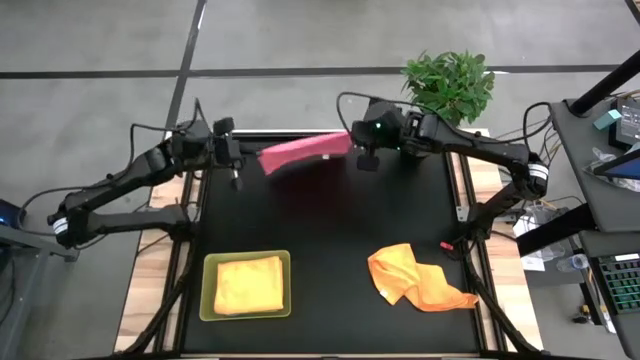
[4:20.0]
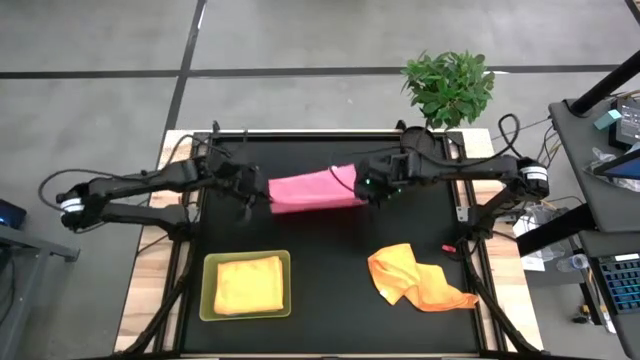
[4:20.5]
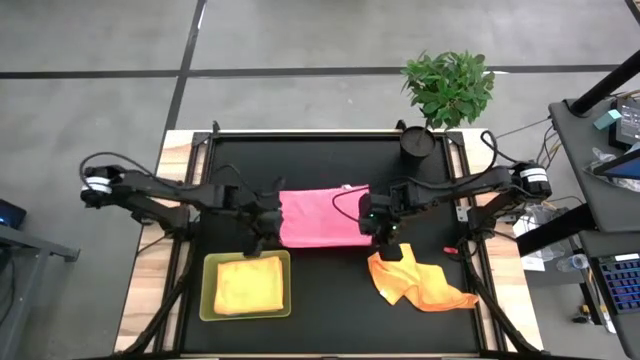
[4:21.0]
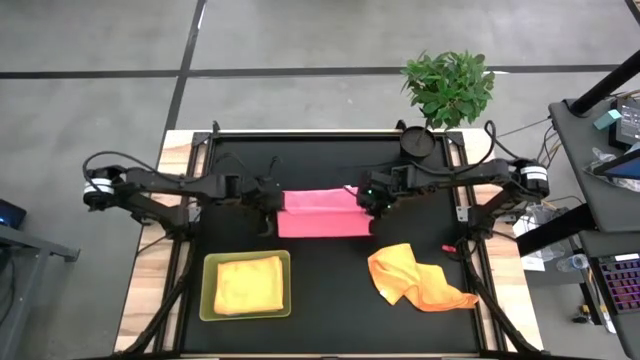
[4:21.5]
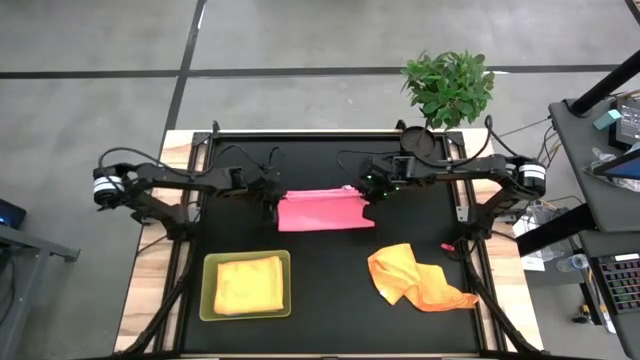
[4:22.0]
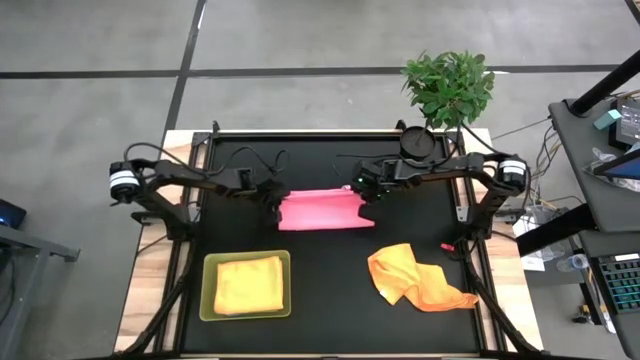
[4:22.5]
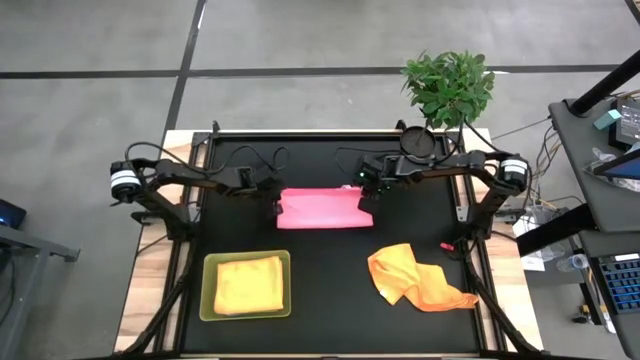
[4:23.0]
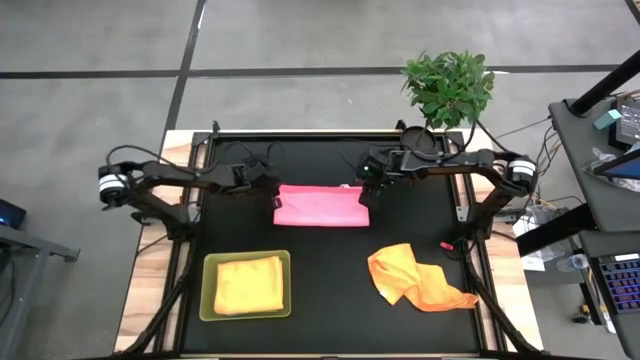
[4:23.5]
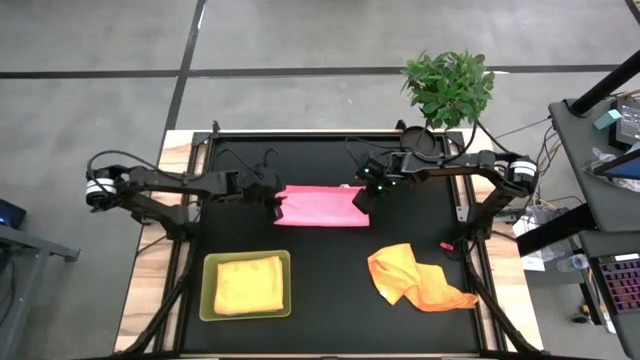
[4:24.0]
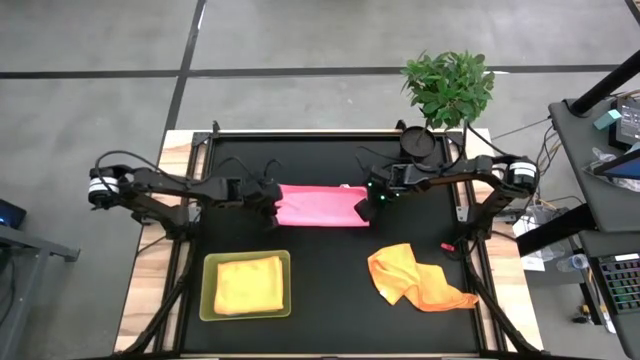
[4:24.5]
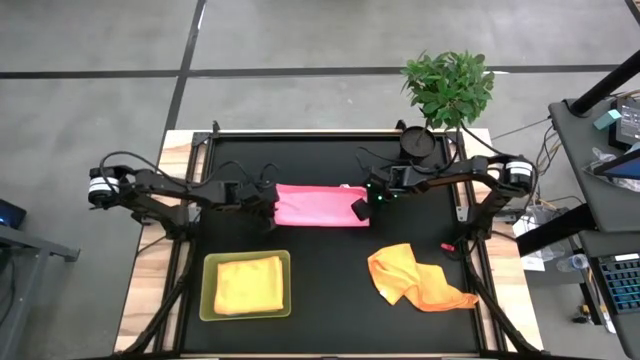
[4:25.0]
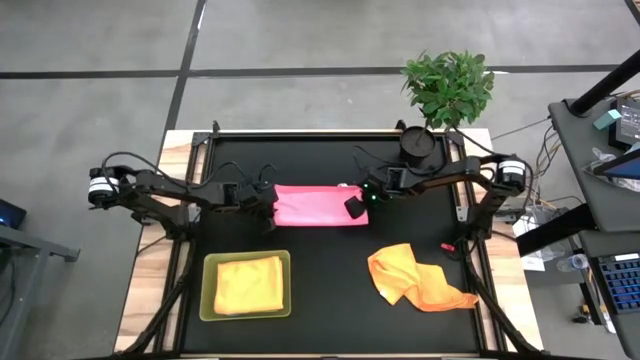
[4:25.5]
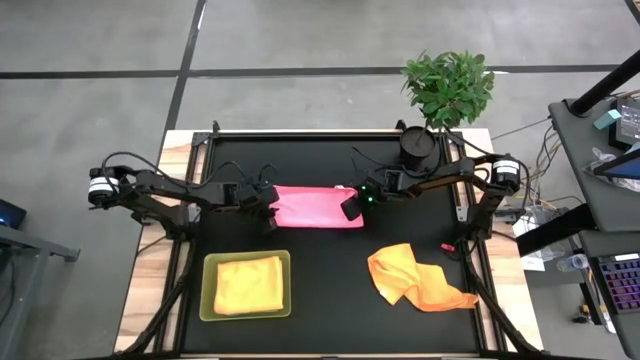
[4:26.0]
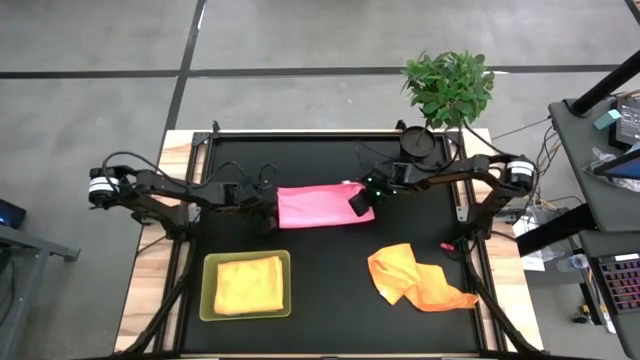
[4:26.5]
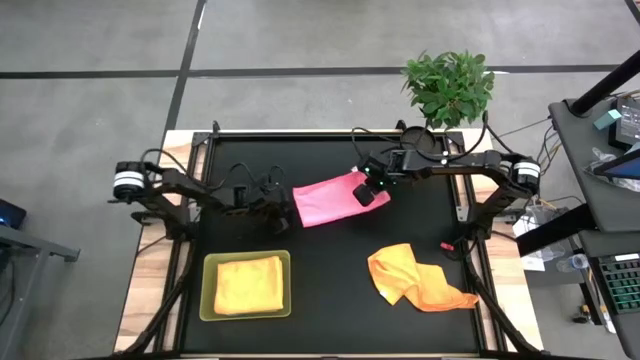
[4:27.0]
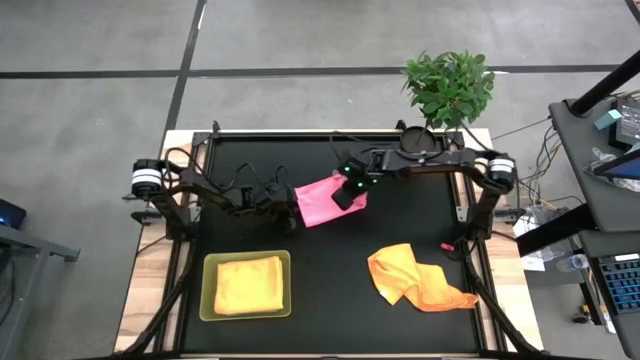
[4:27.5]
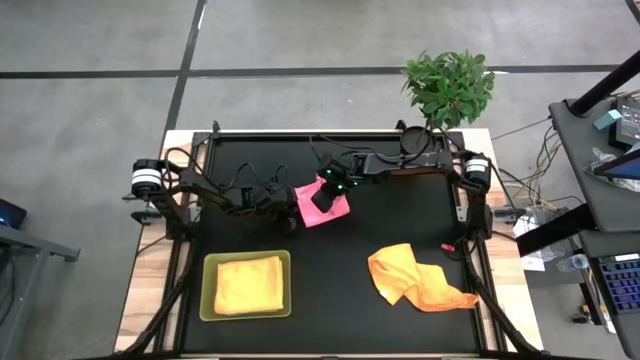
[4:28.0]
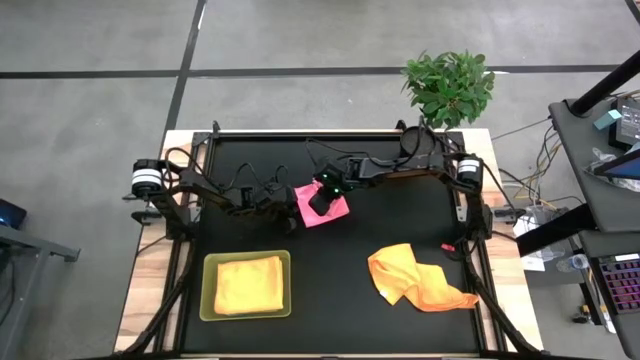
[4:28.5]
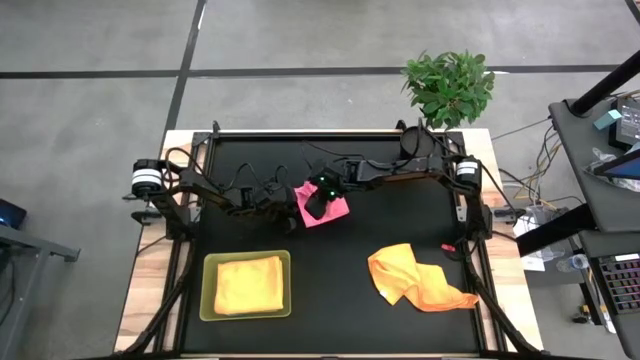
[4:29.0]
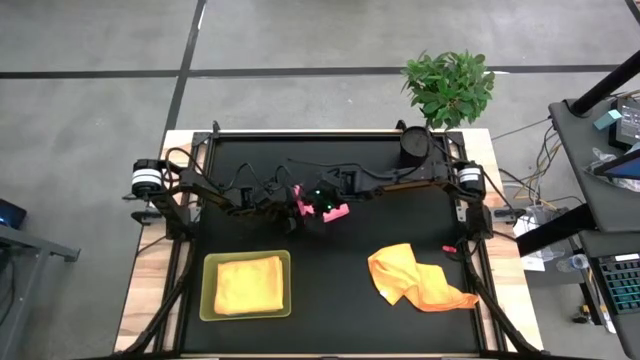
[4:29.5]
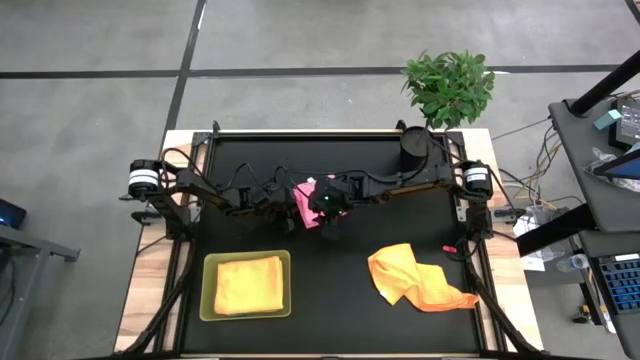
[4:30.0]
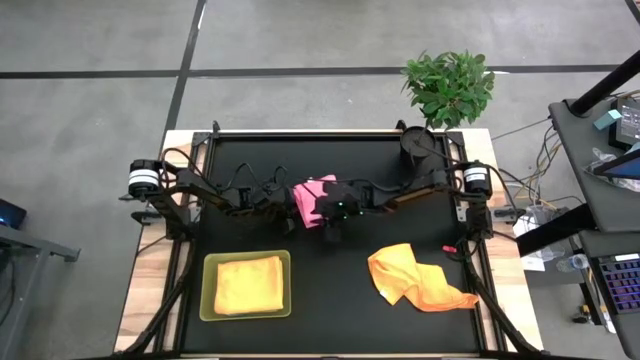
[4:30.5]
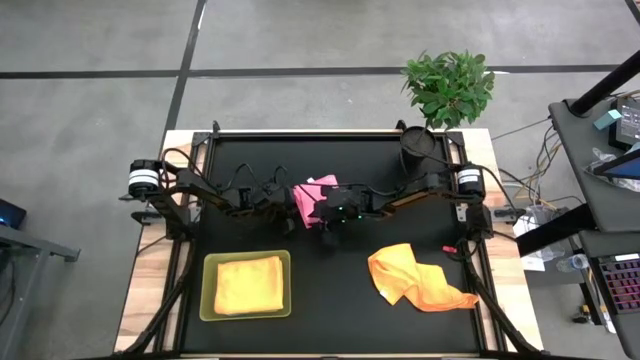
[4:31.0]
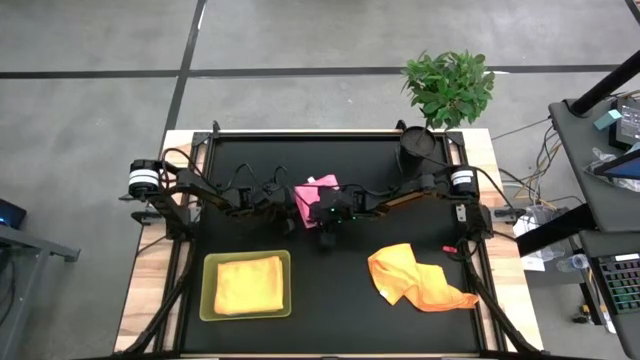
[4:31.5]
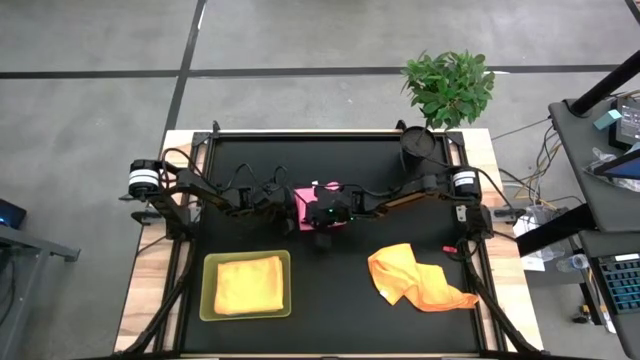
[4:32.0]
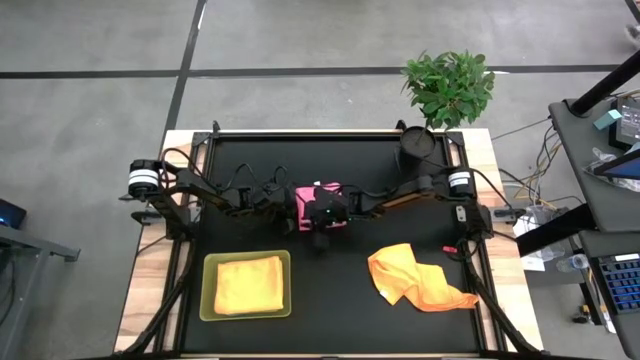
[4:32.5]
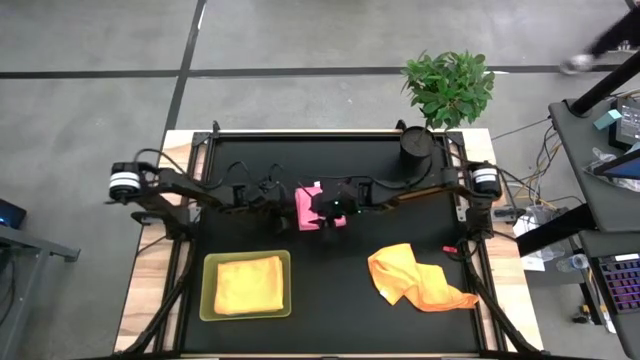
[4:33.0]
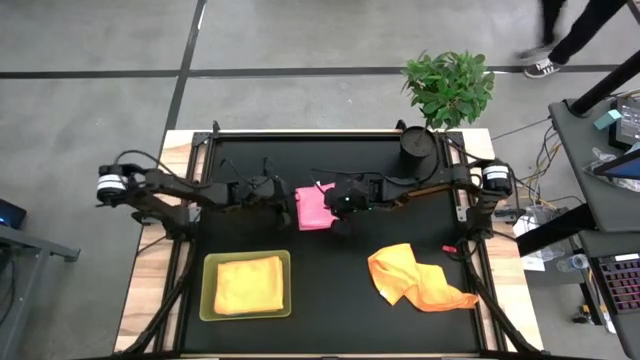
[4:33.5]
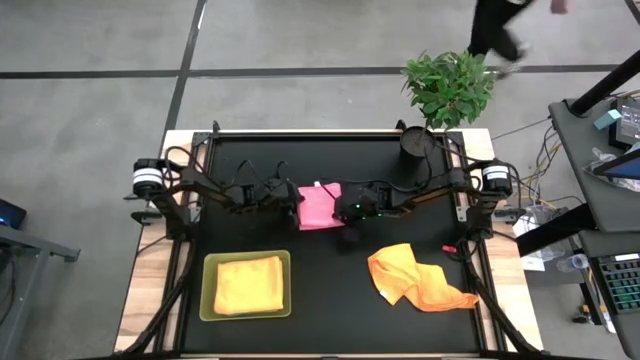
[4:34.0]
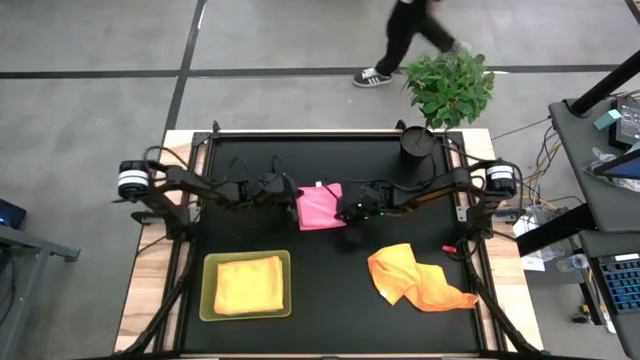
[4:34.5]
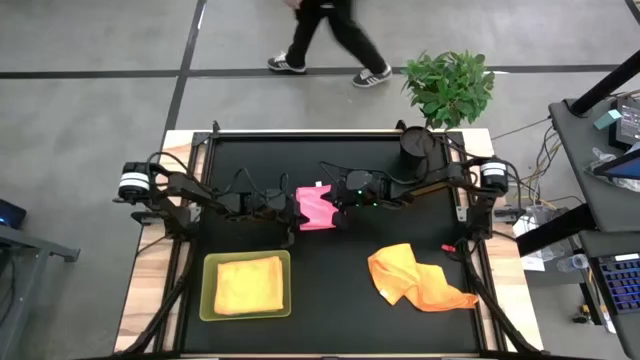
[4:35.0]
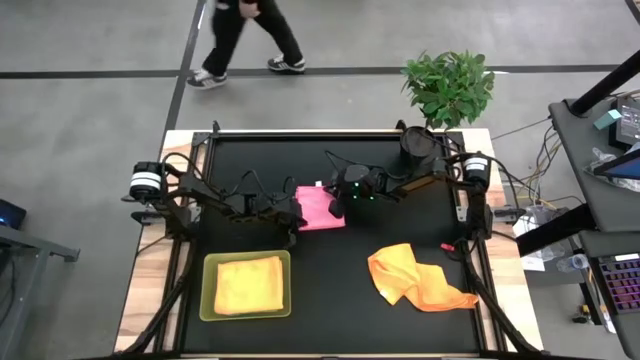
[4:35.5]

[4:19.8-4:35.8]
Task: Fold microfiber towels
Fold the pink microfiber towel

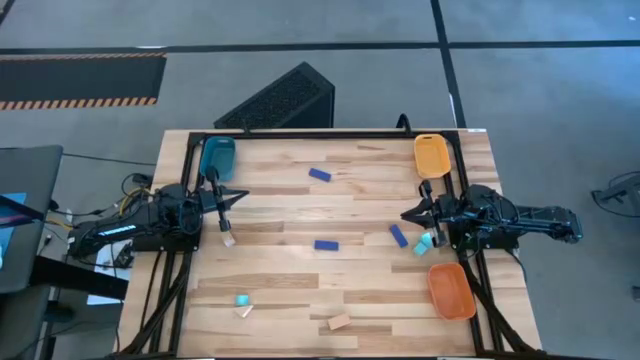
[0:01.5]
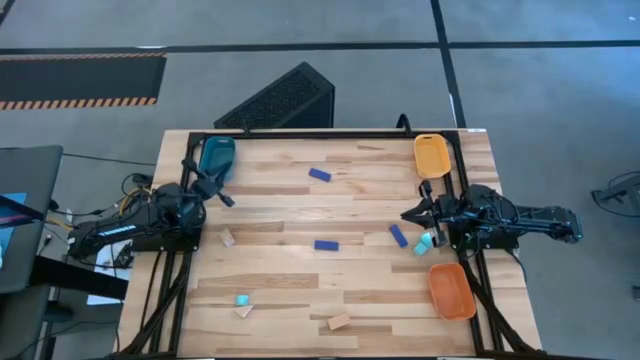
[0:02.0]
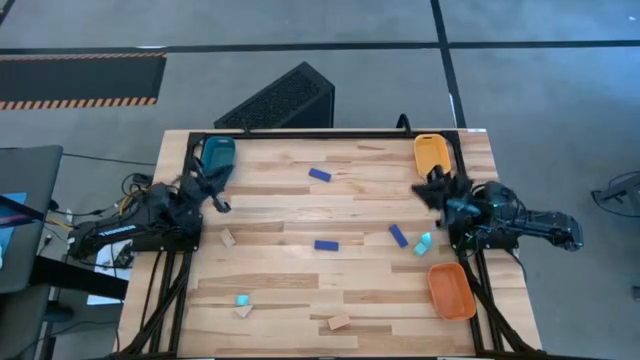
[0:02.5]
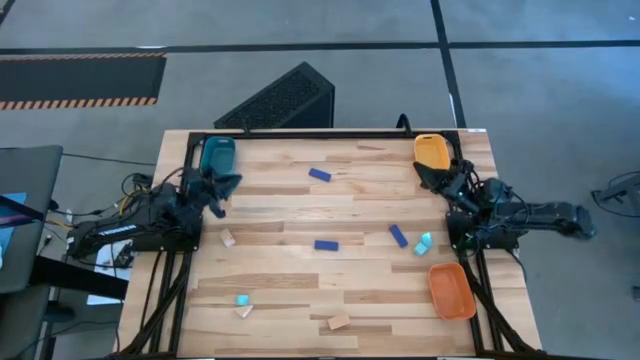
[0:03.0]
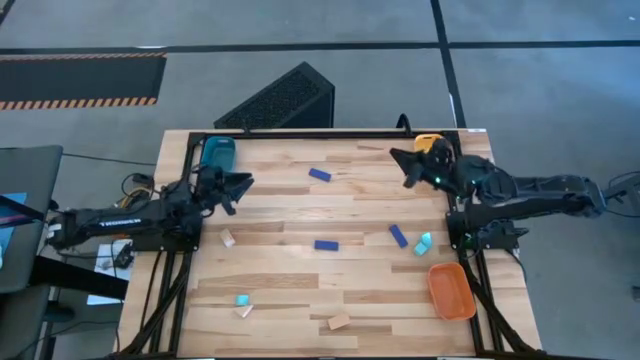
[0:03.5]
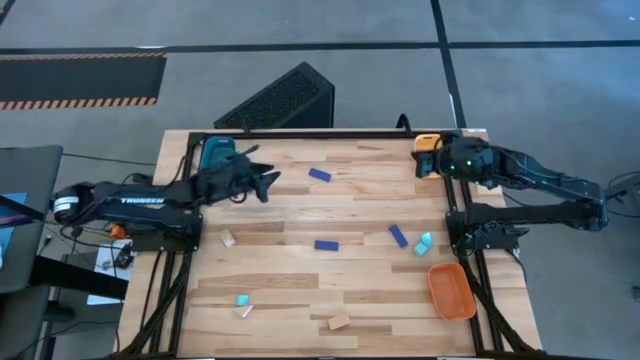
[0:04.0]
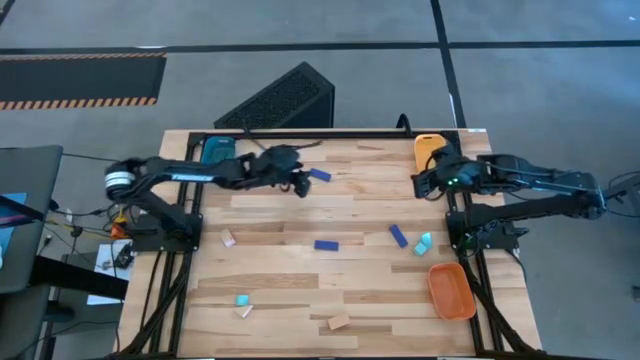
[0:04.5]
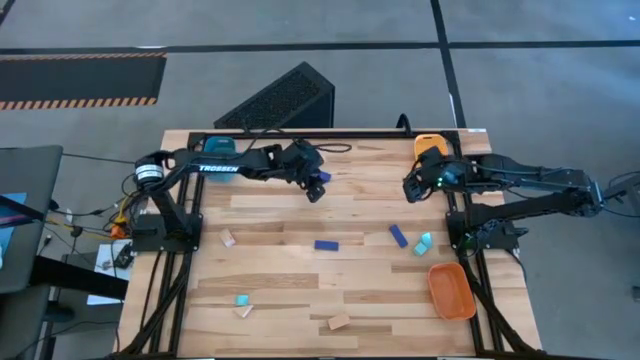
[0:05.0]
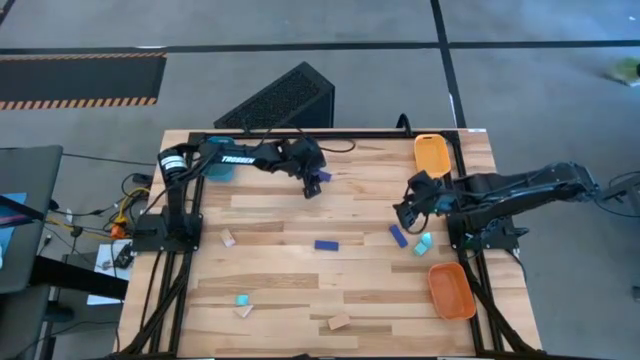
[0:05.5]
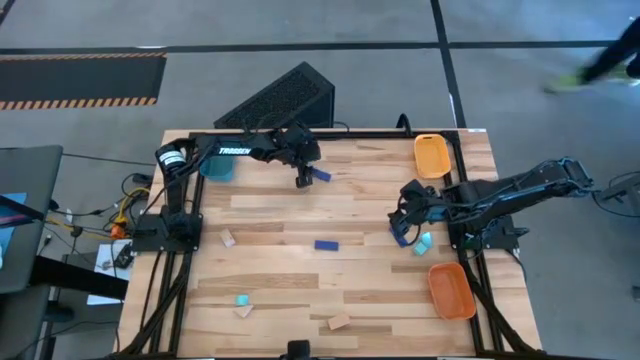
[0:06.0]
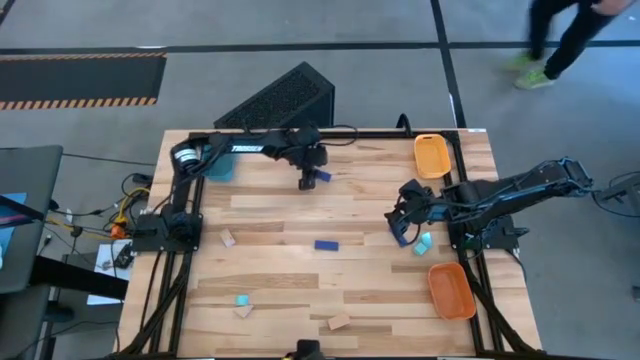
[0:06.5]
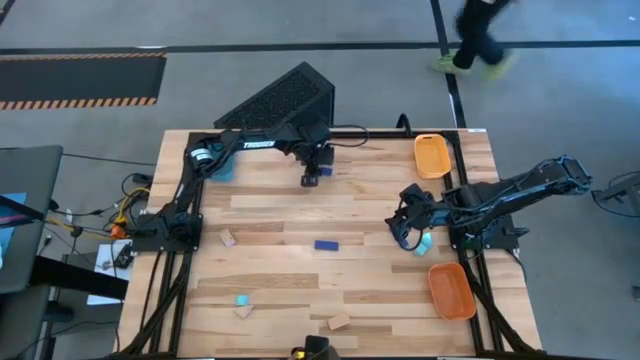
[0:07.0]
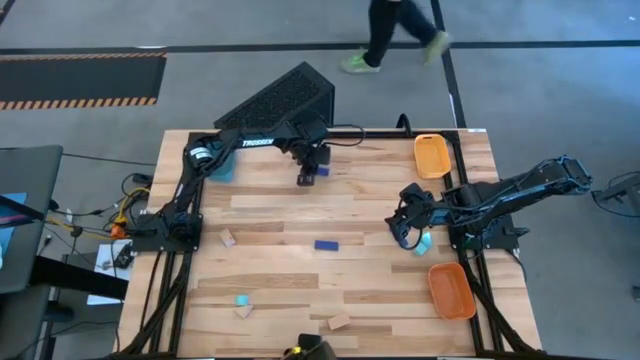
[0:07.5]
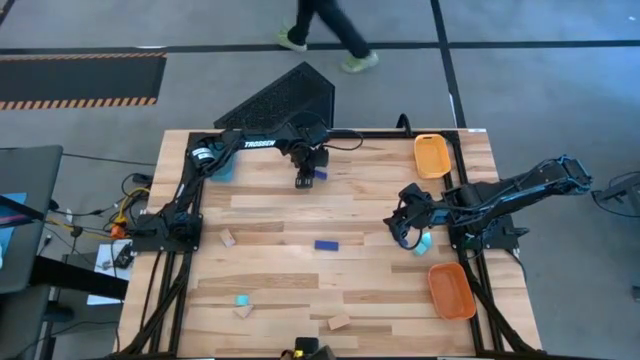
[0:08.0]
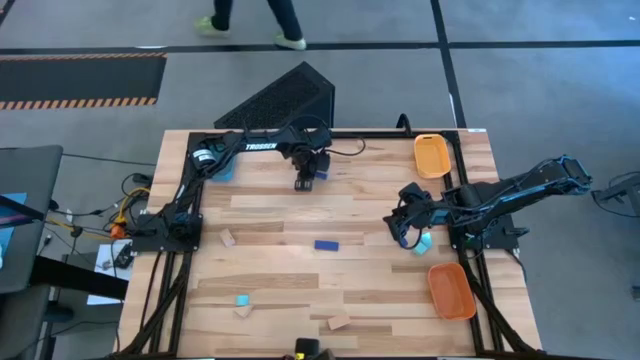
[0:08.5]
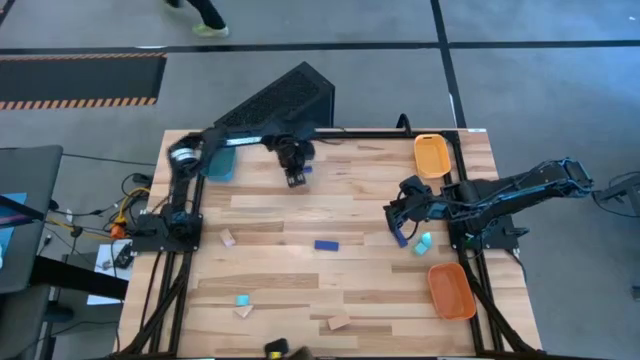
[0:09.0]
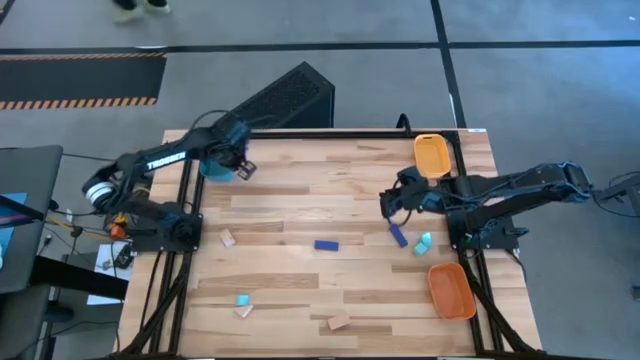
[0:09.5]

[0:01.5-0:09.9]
Task: Sort & place blocks by color
Put the top left blue block into the blue bin
